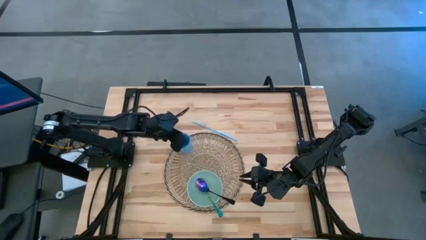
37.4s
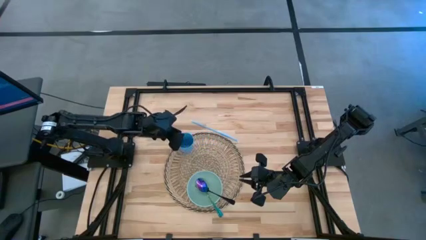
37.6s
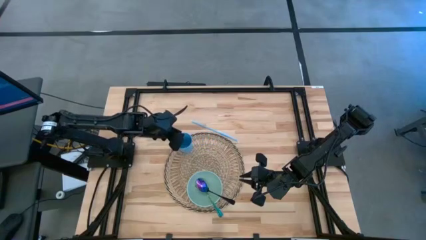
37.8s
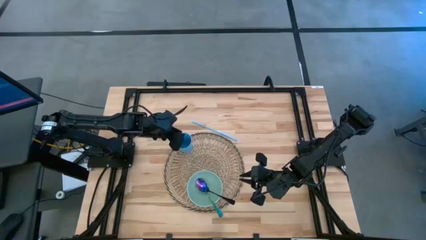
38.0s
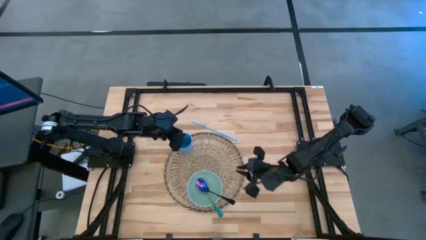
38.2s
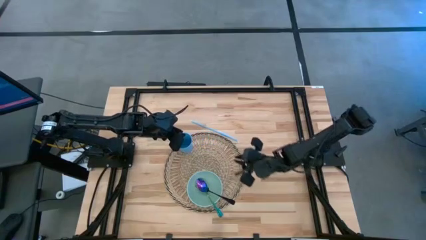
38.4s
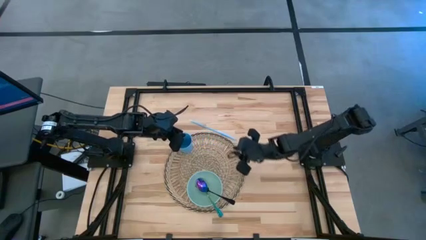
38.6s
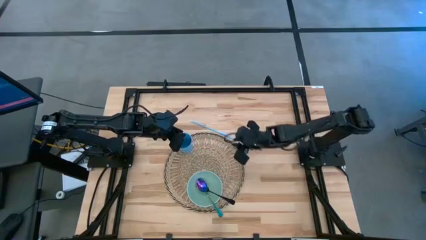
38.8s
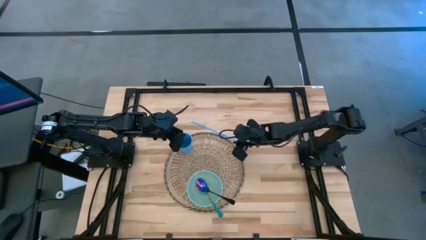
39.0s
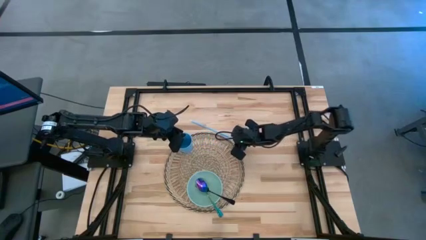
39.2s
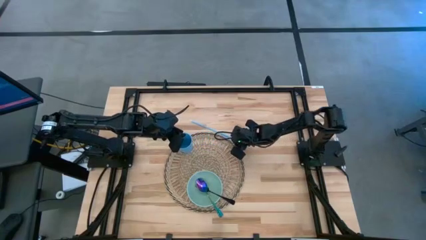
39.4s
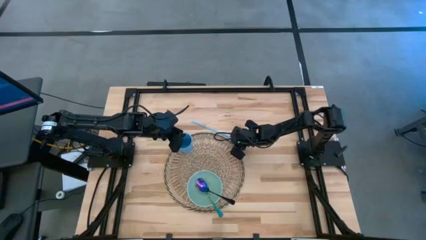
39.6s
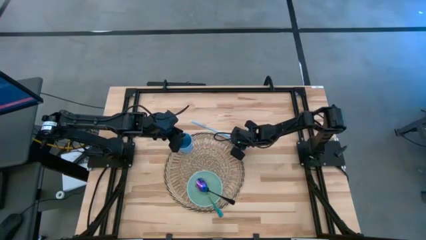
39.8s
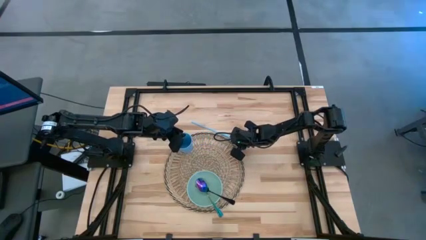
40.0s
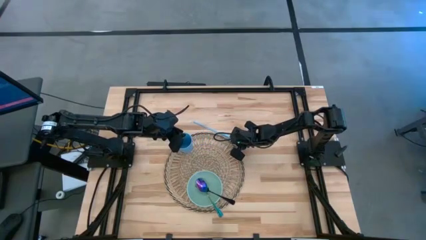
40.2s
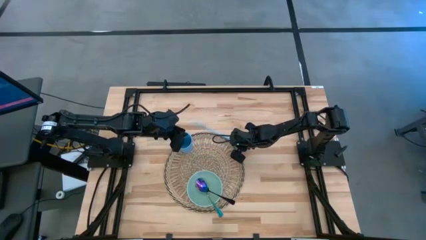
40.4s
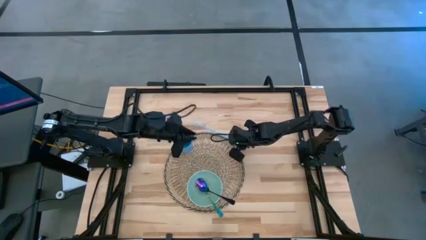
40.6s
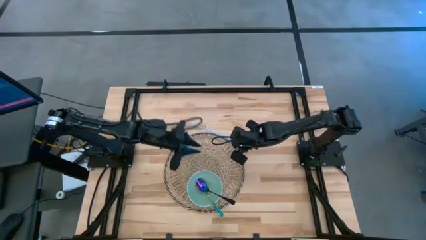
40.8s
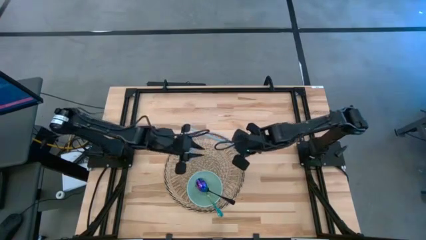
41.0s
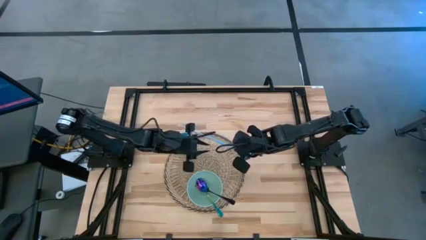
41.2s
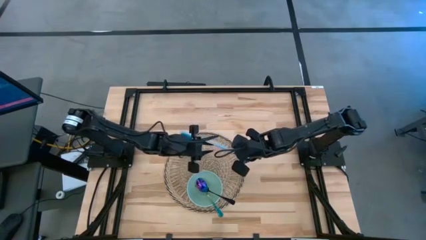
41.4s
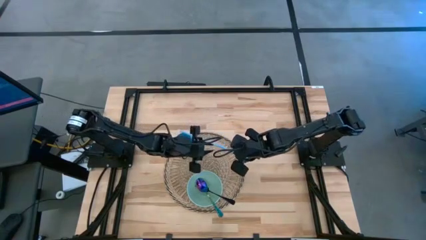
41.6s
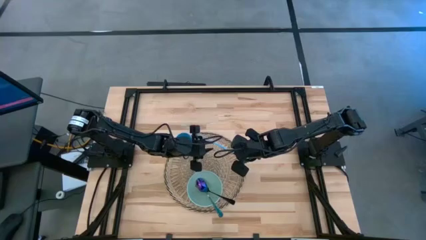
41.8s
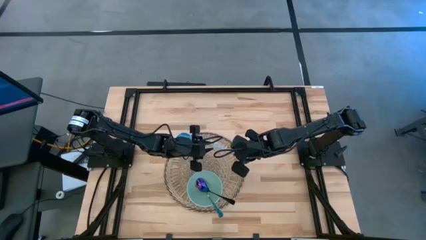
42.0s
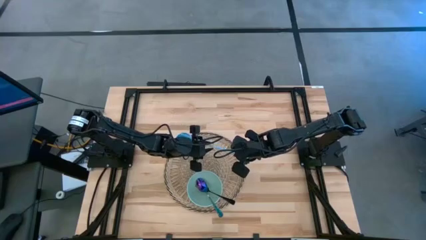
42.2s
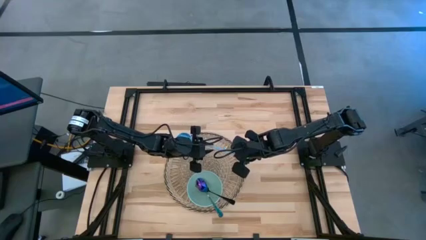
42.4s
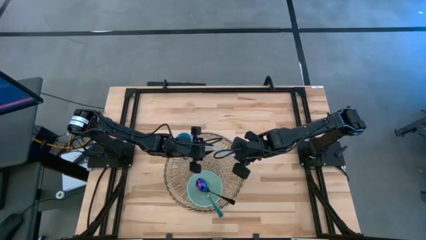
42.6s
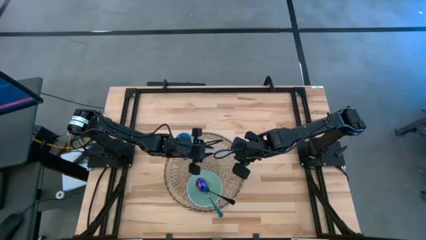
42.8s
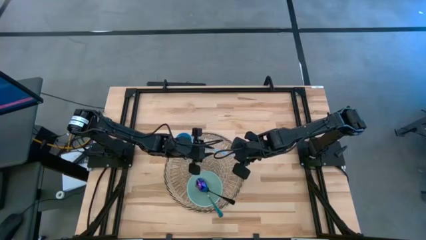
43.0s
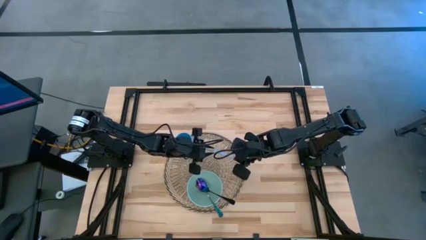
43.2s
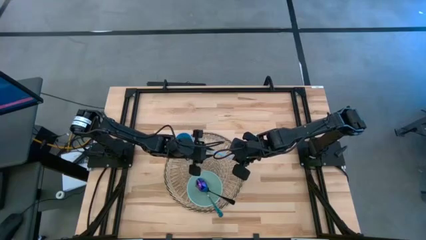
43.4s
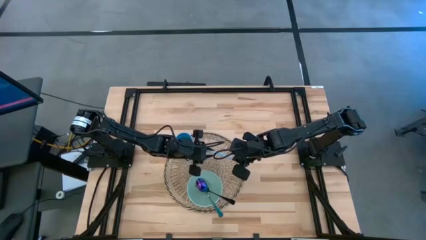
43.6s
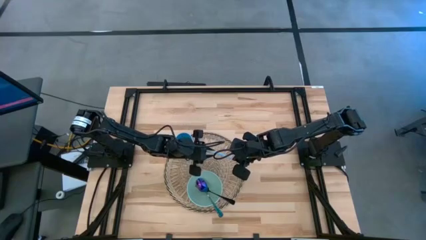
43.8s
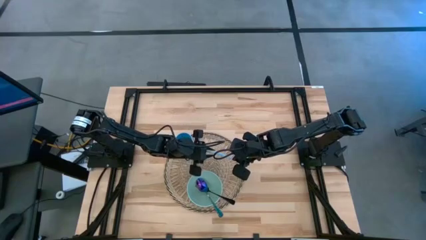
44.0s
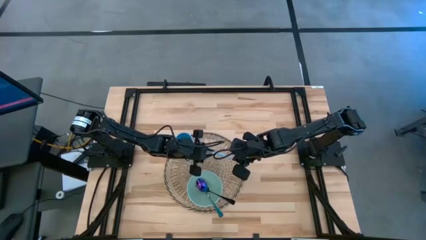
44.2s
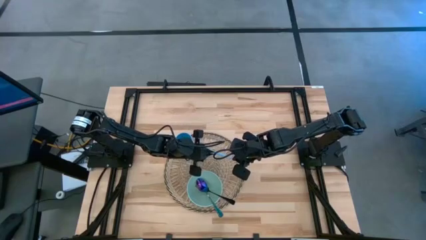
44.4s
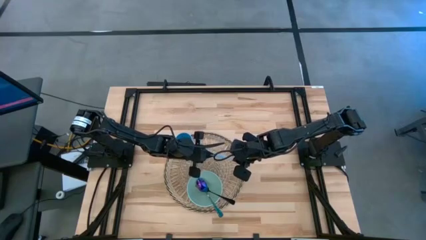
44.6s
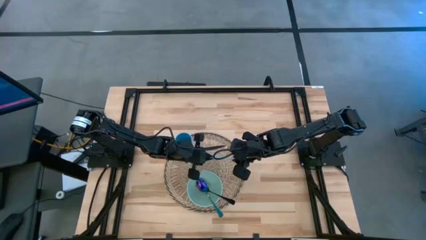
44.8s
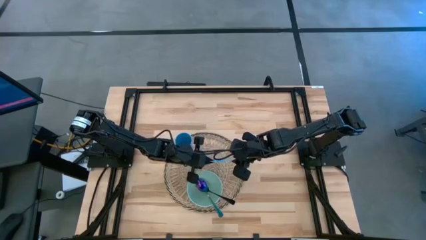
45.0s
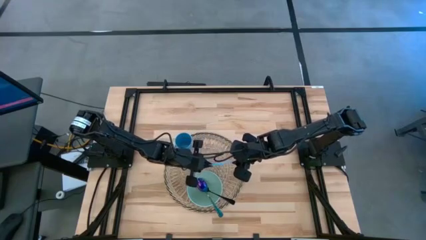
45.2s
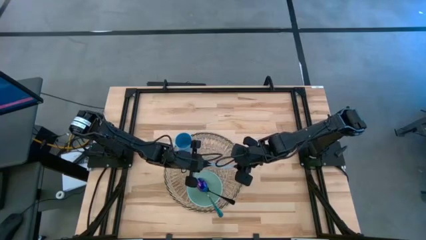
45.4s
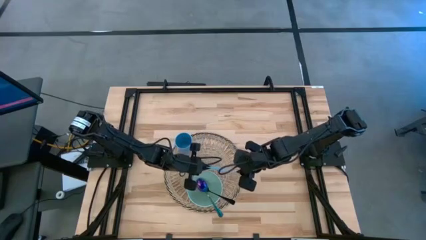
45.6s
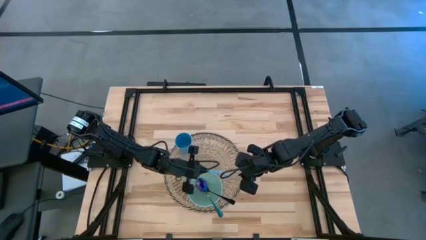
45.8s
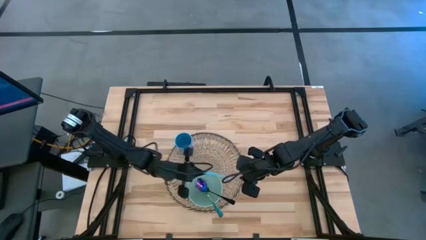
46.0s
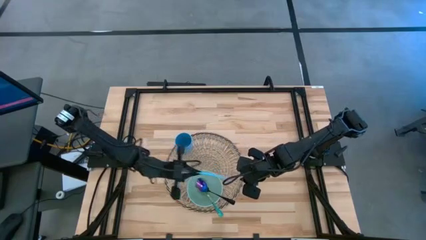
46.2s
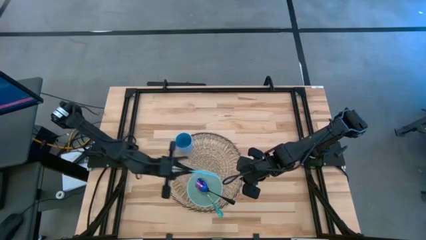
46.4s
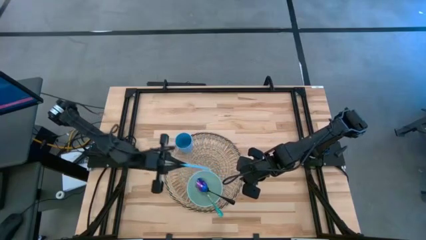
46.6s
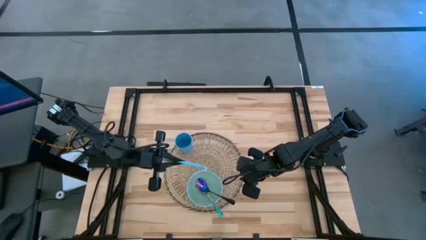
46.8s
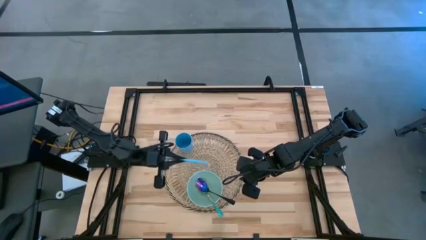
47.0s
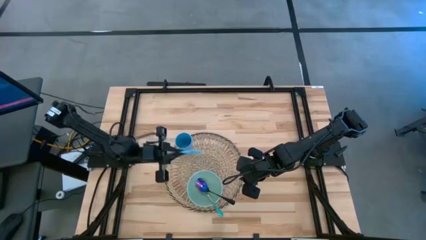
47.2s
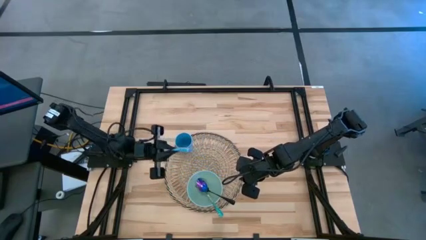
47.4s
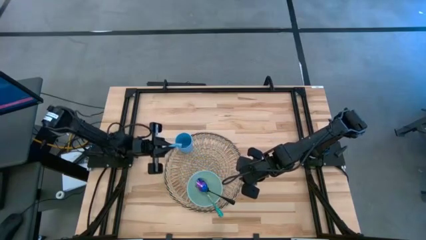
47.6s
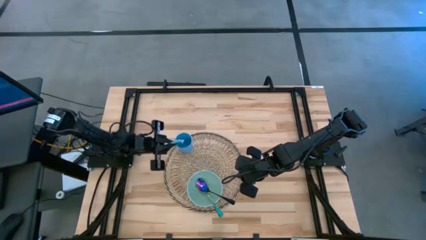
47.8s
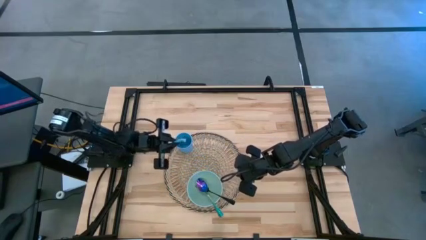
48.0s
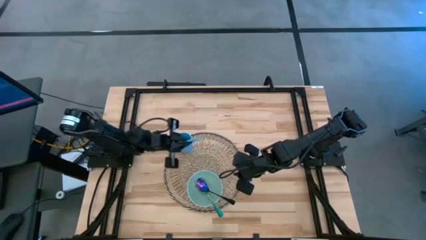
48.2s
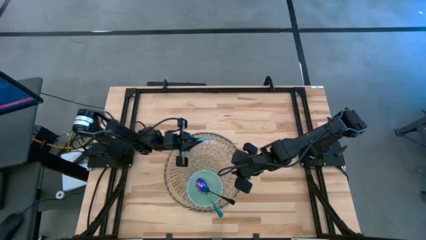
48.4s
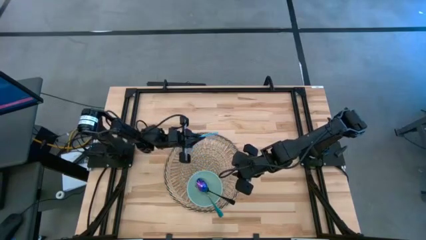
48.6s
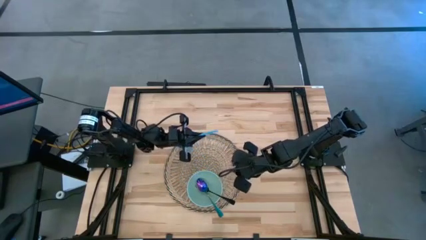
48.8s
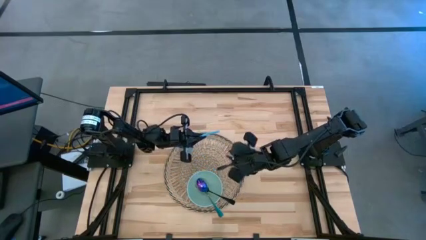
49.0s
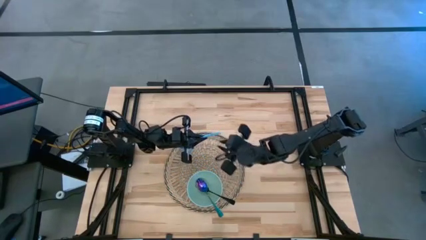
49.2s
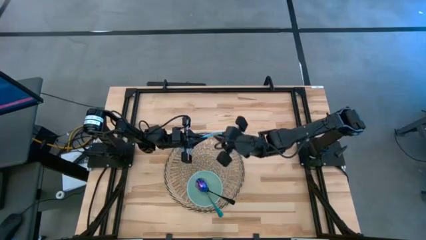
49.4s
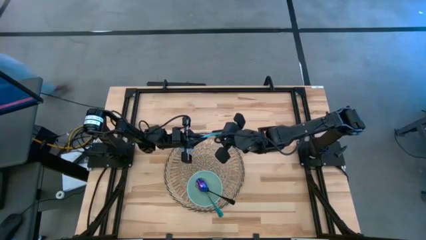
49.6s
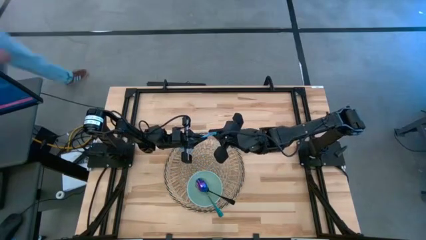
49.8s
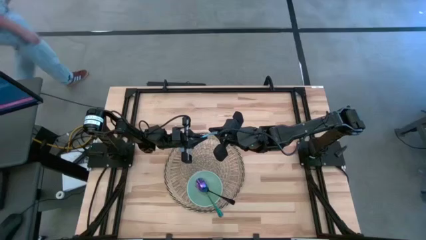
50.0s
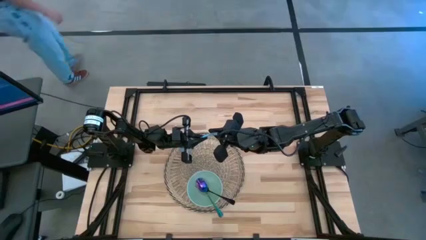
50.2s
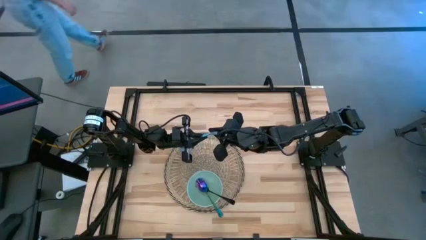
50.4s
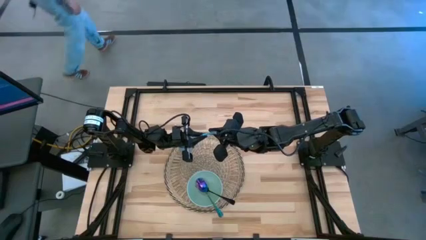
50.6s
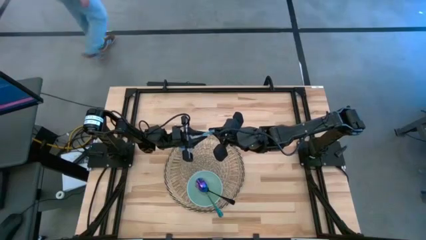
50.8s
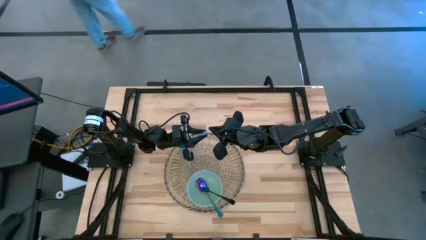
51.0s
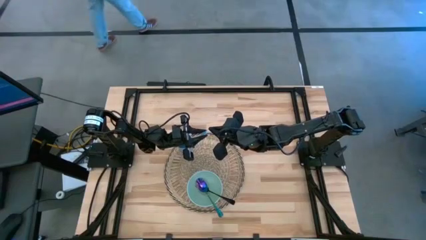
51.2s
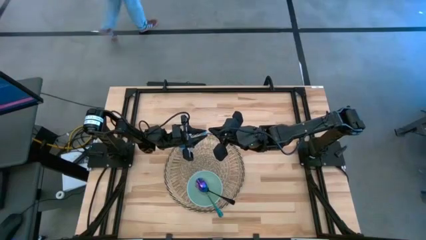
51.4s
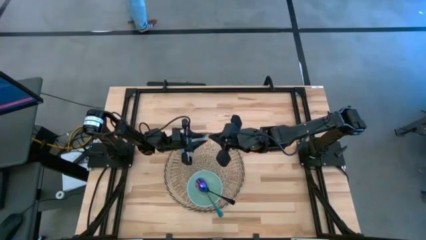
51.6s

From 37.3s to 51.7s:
Task: Pick & Place Utensil
Put the blue straw into the blue cup on the brown mat
